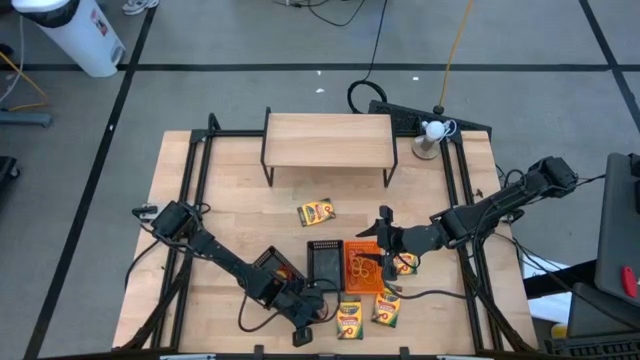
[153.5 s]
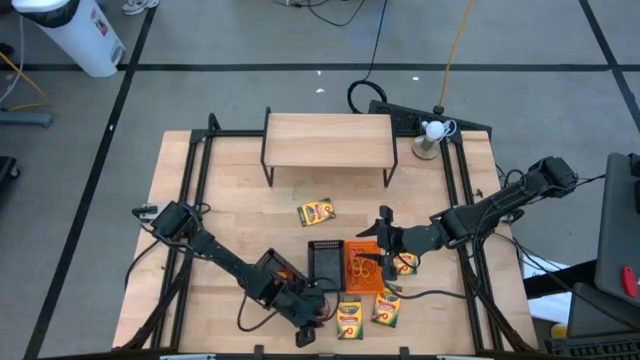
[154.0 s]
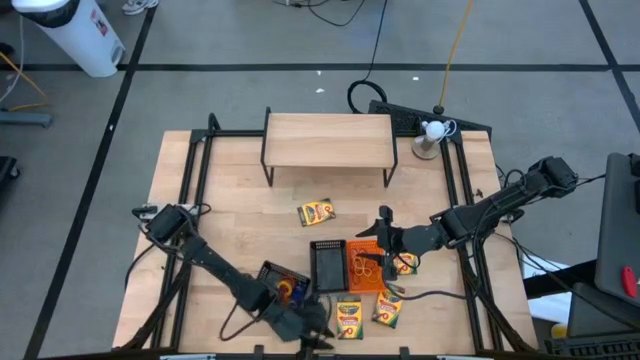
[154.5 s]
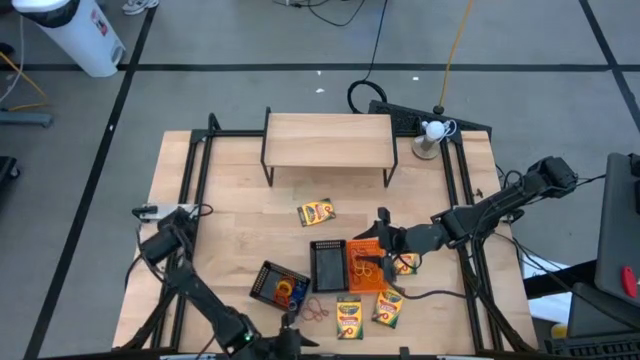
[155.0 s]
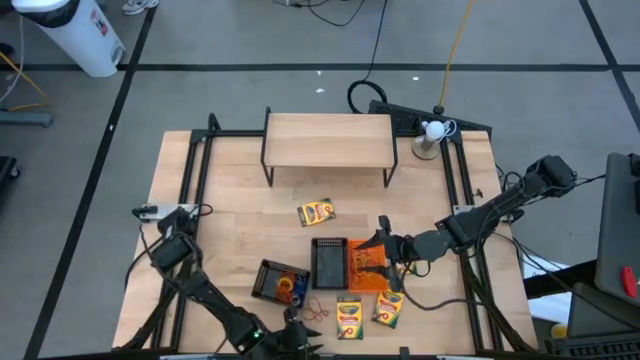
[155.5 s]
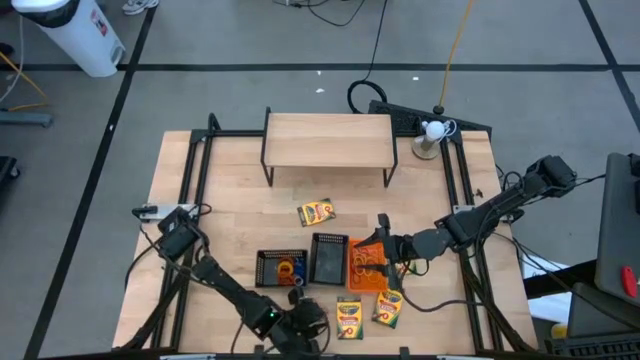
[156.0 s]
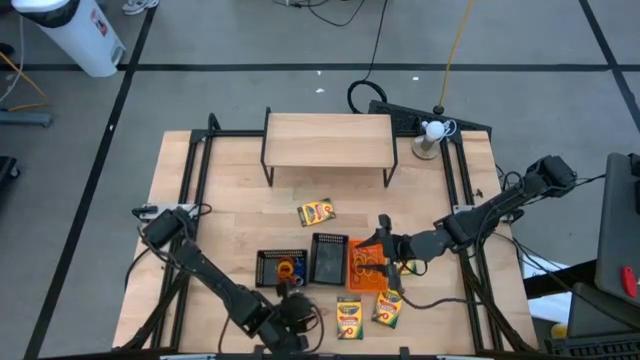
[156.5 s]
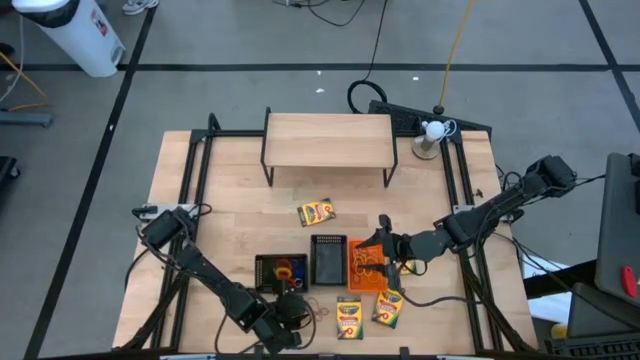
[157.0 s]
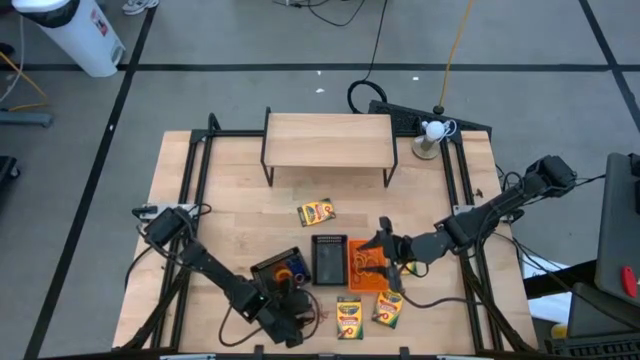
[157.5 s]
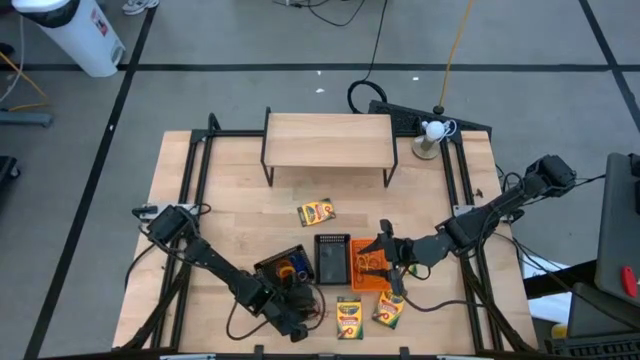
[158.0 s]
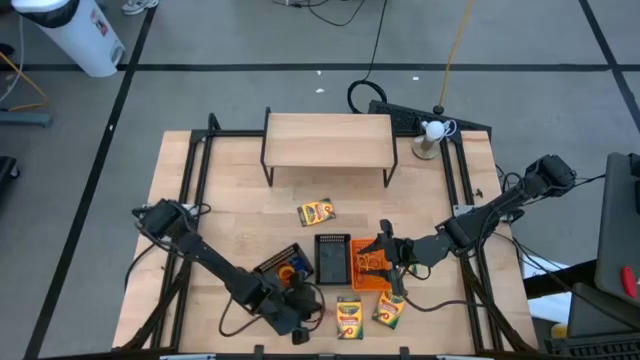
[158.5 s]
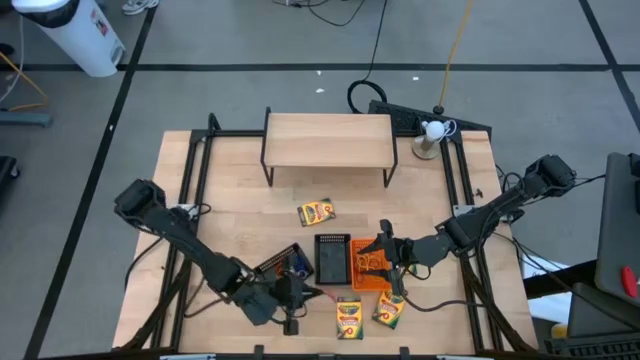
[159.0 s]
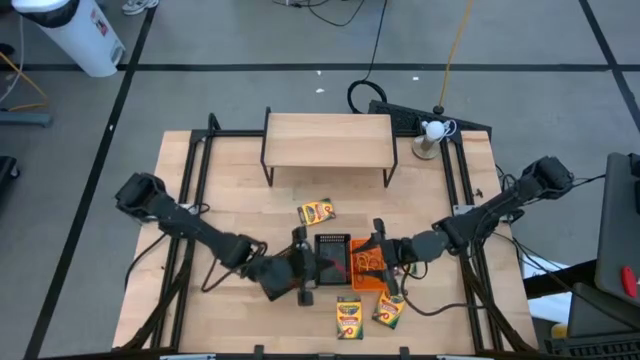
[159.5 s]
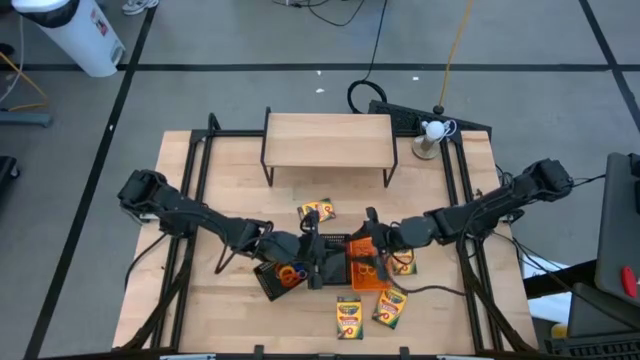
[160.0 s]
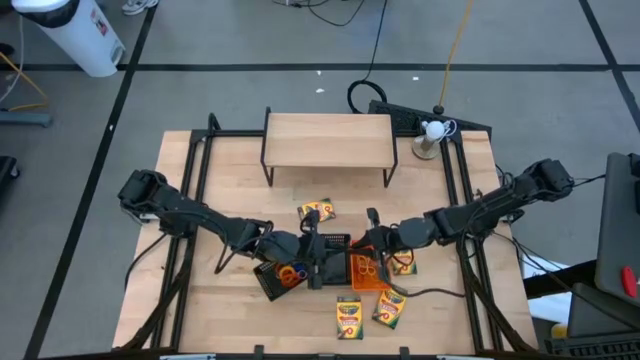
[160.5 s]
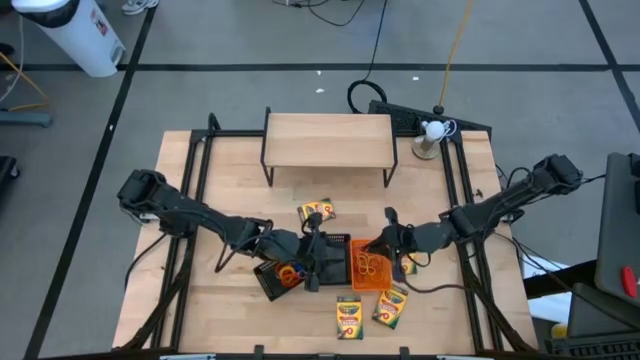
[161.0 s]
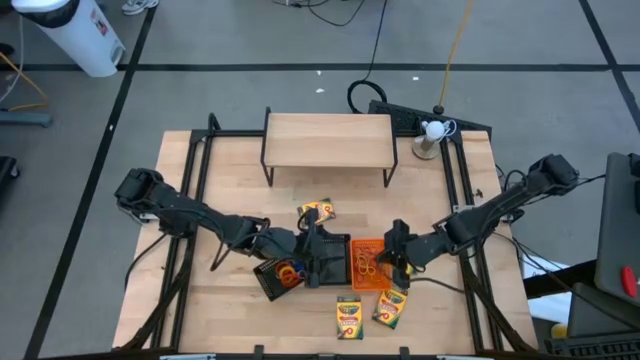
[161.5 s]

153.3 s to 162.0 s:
Task: Pick & Place Office Desk Supplies
Put the red rubber band into the orange bin

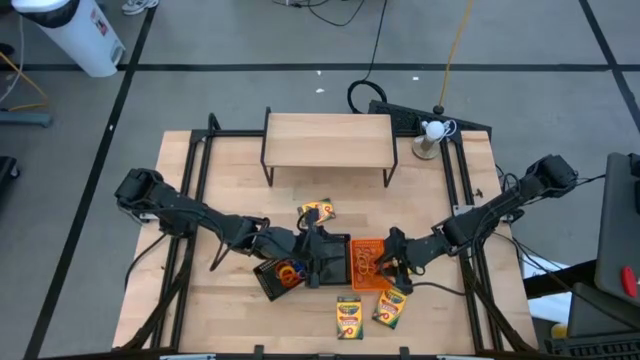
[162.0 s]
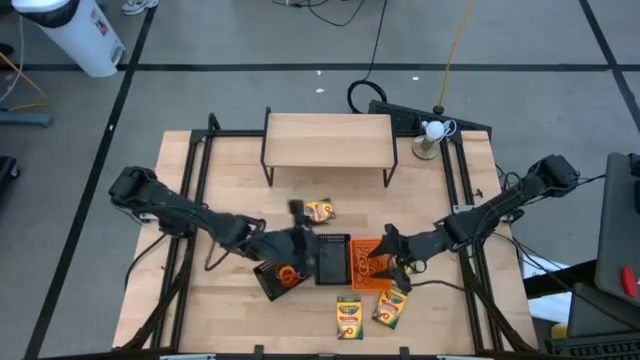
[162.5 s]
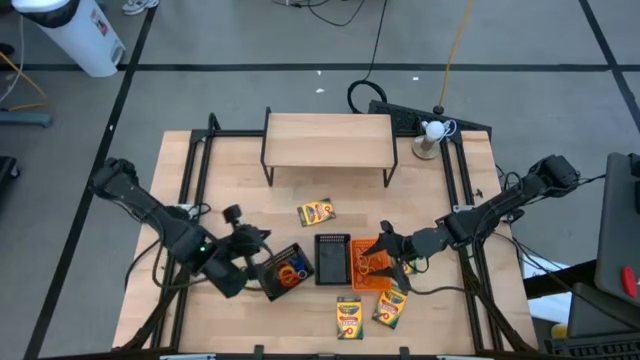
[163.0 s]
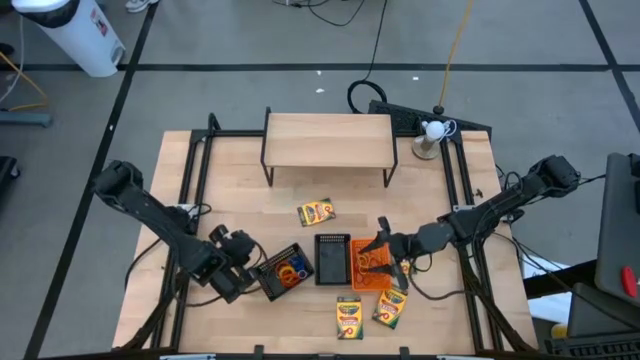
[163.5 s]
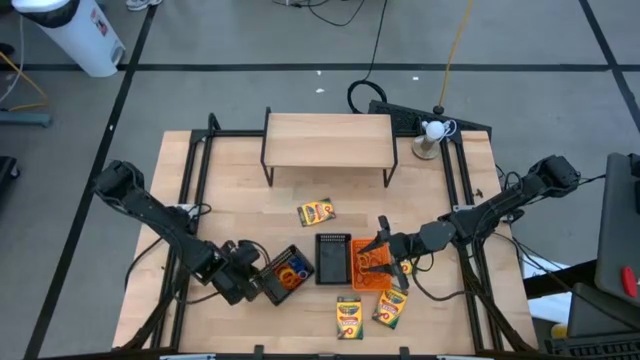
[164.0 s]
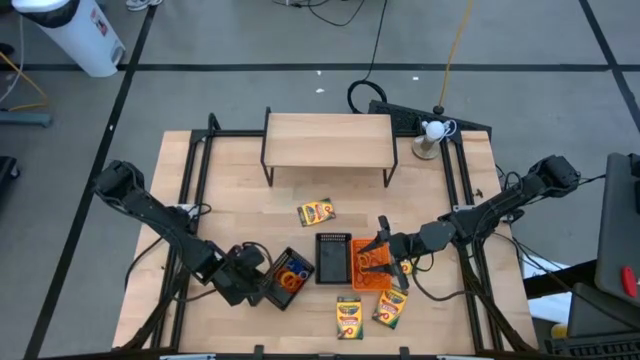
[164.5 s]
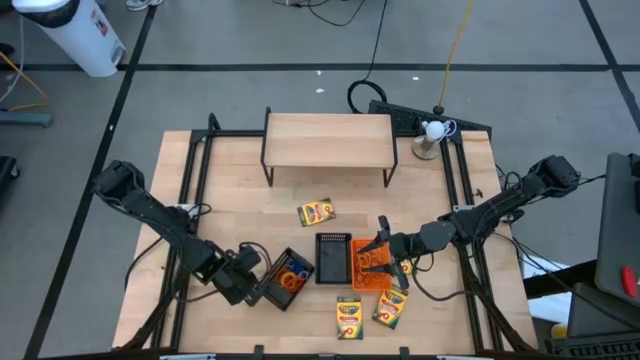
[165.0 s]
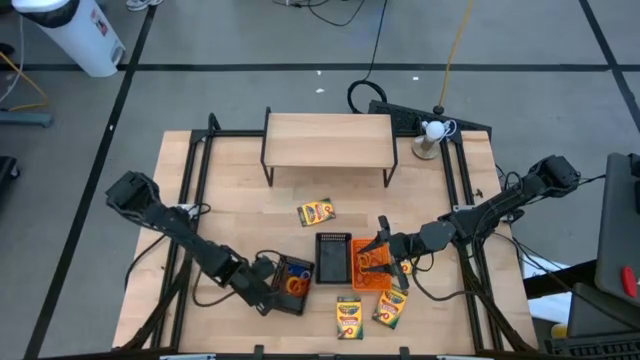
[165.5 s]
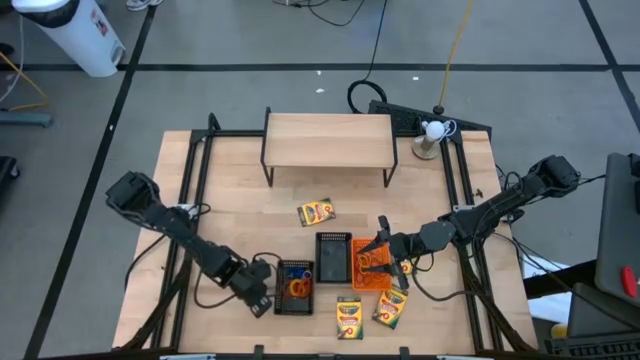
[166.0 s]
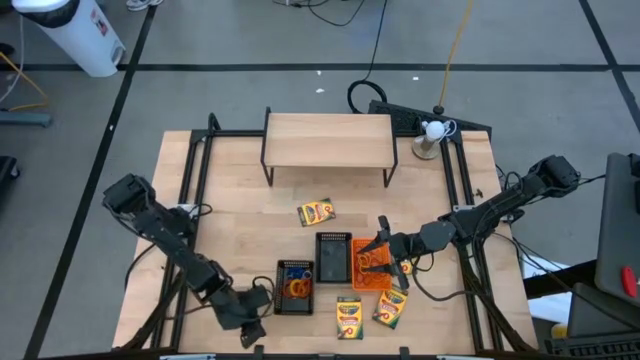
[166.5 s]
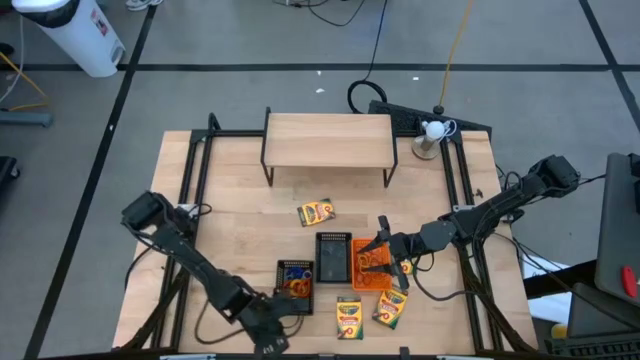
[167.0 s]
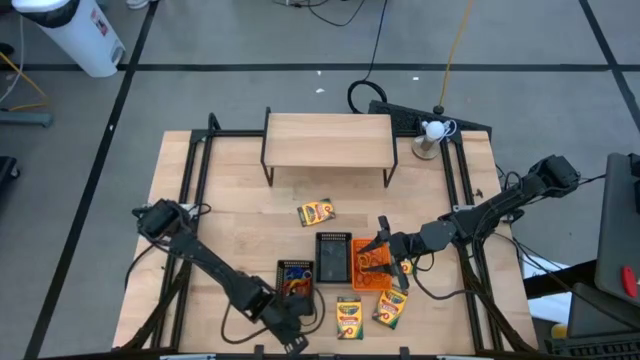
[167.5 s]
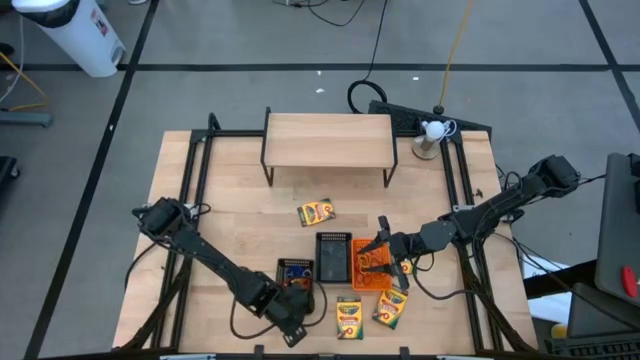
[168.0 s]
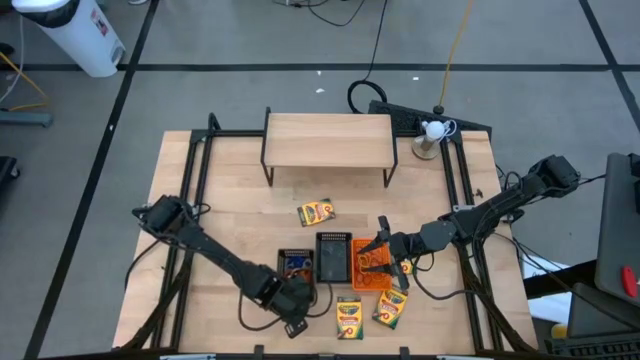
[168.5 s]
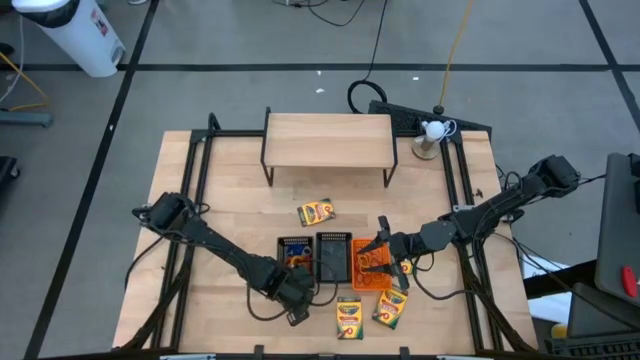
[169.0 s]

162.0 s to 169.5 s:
Adjust the left black bin

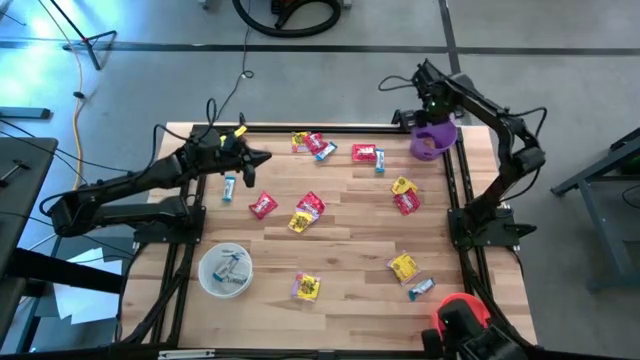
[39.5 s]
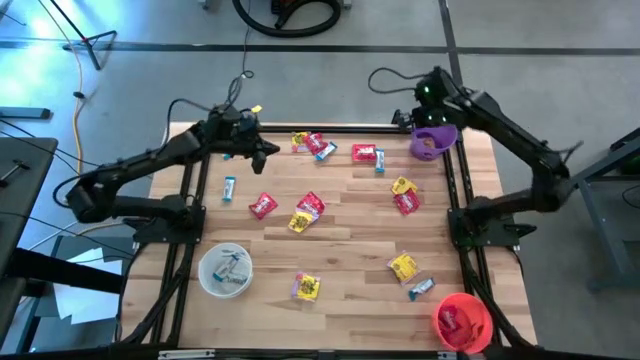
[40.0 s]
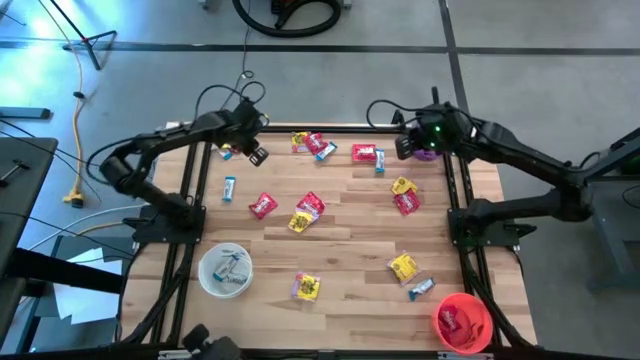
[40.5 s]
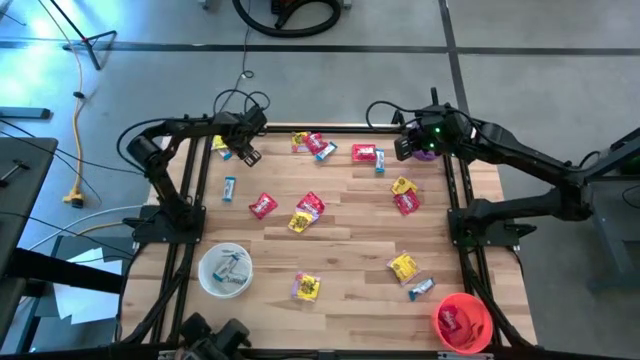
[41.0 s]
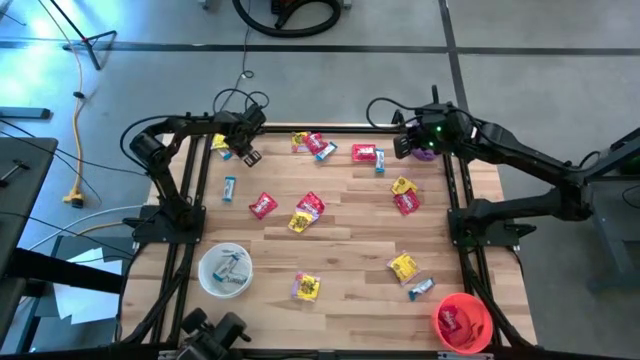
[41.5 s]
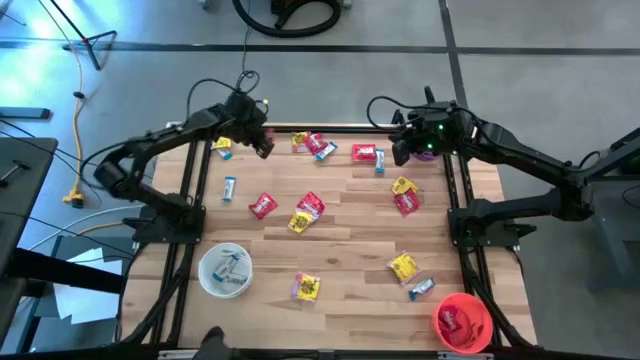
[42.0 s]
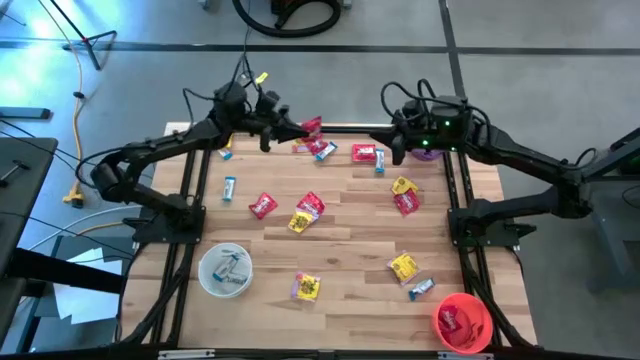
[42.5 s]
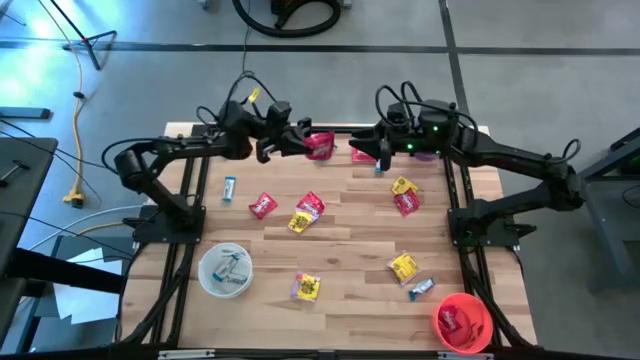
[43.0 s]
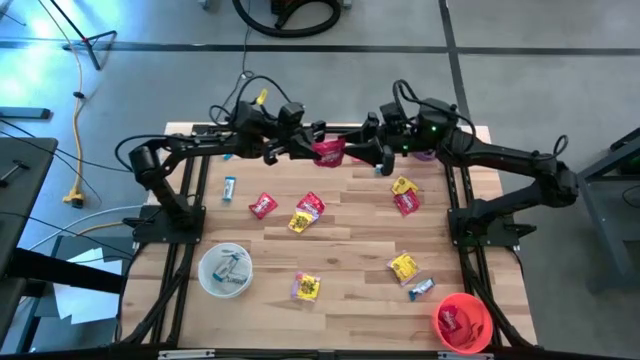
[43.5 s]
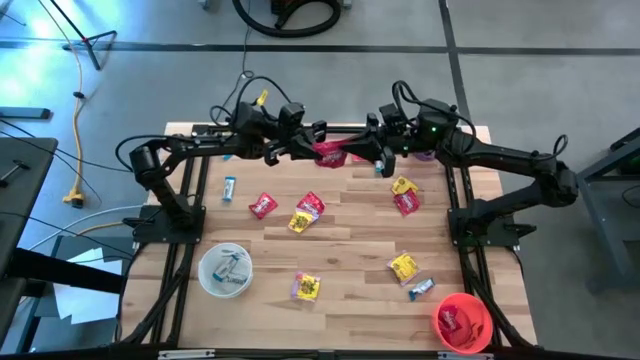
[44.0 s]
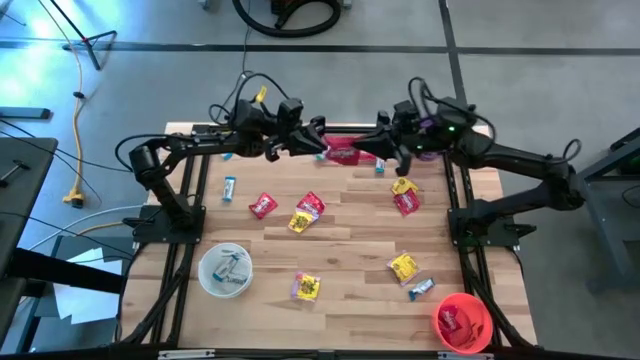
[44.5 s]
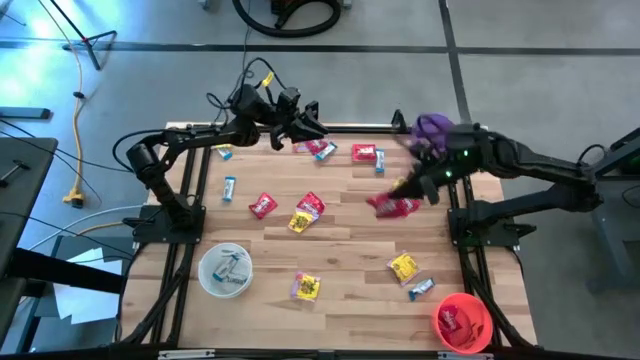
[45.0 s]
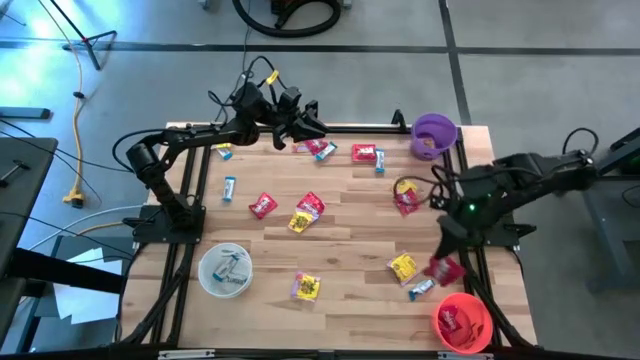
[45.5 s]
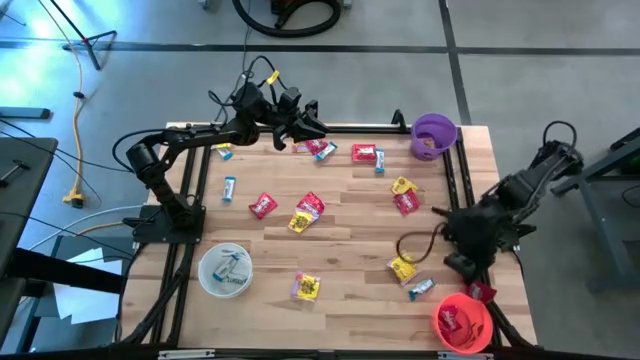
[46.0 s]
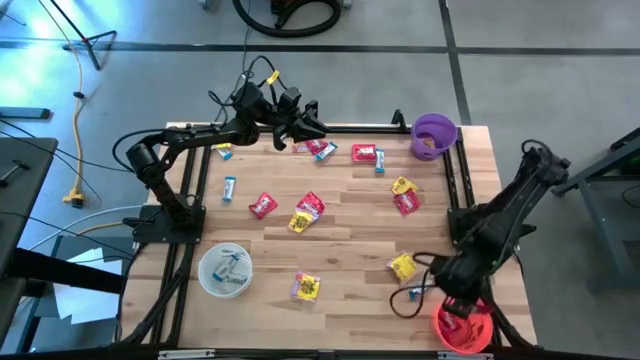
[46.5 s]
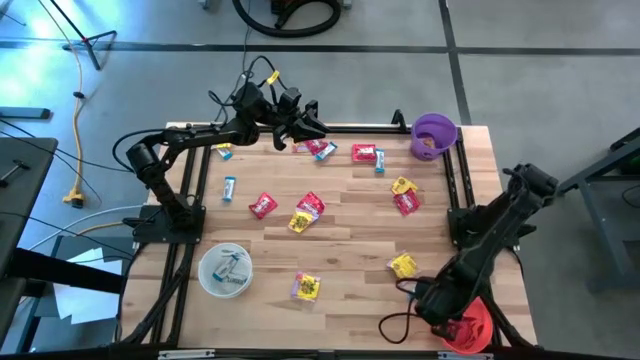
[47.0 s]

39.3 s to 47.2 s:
Task: Sort candy
Put the red candy into the orange bin
